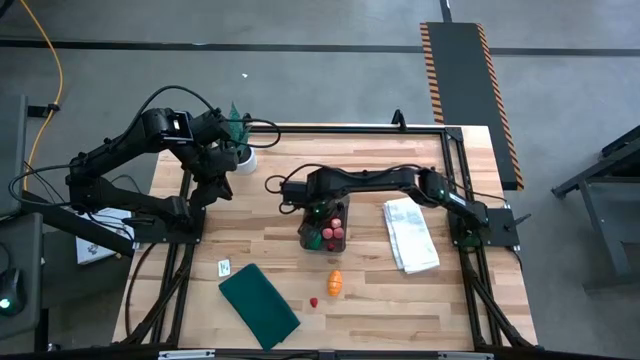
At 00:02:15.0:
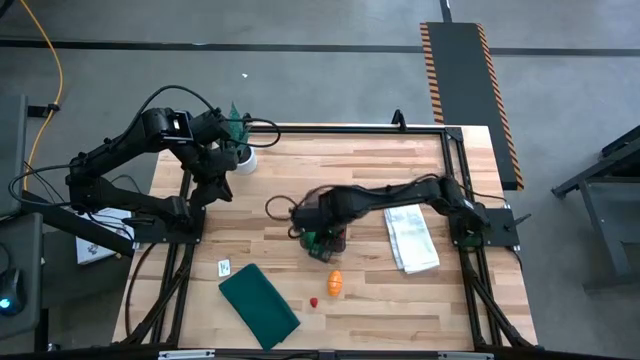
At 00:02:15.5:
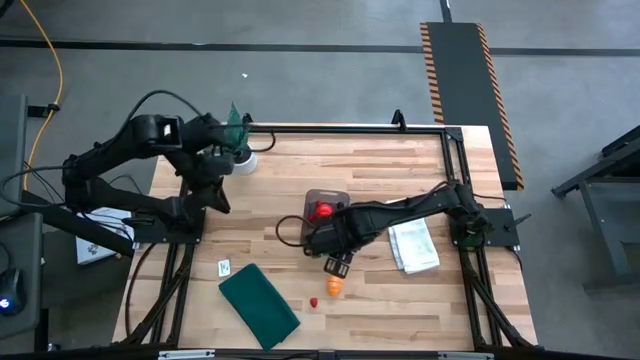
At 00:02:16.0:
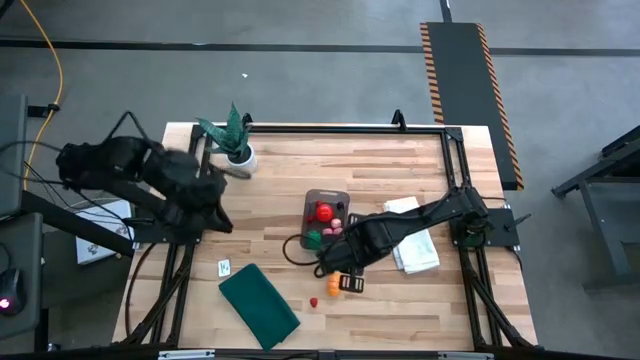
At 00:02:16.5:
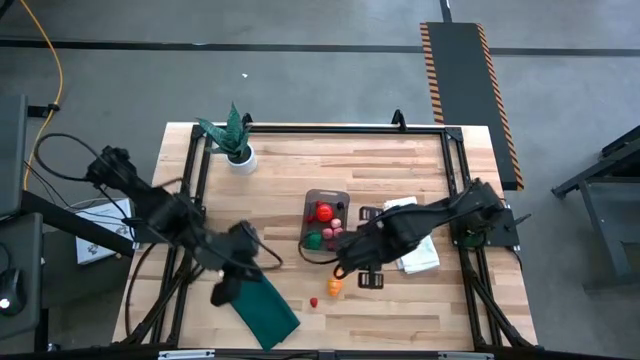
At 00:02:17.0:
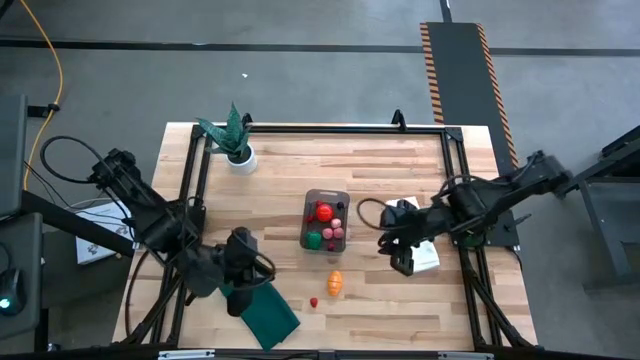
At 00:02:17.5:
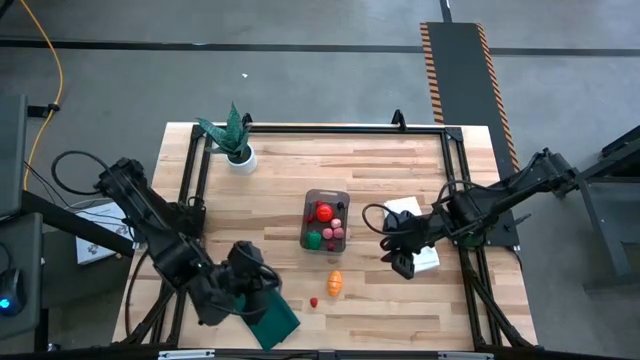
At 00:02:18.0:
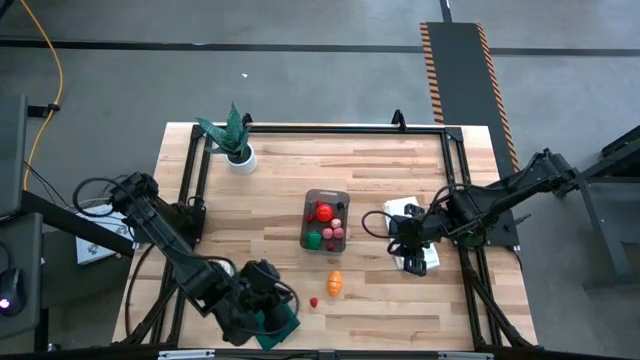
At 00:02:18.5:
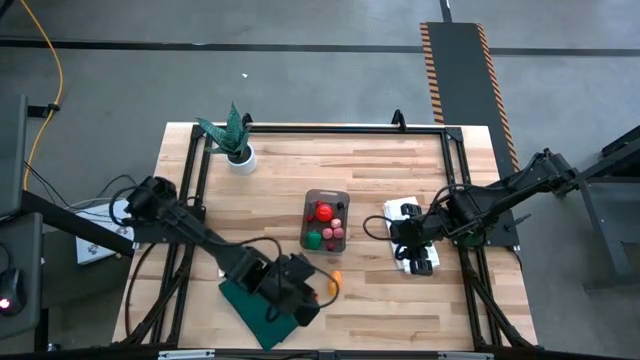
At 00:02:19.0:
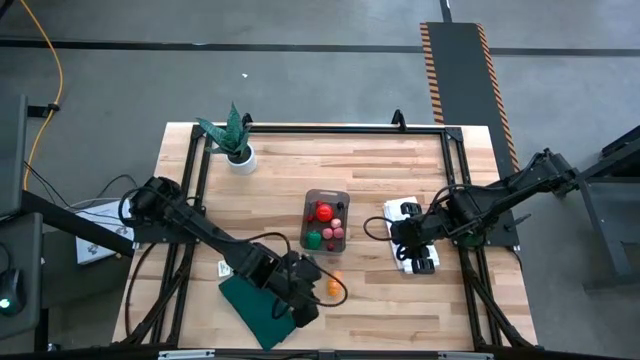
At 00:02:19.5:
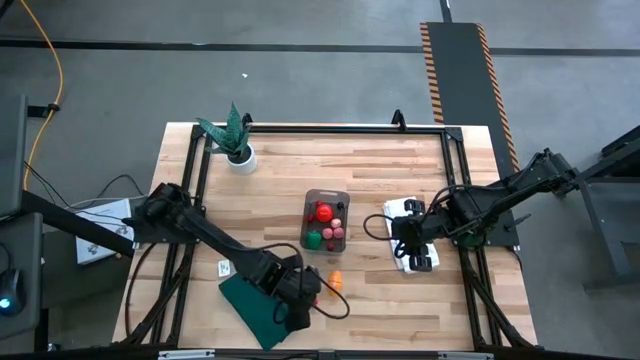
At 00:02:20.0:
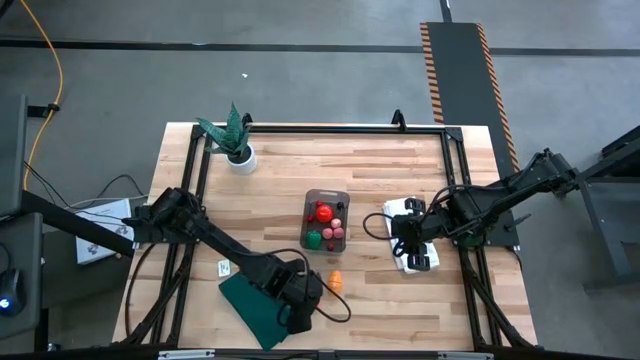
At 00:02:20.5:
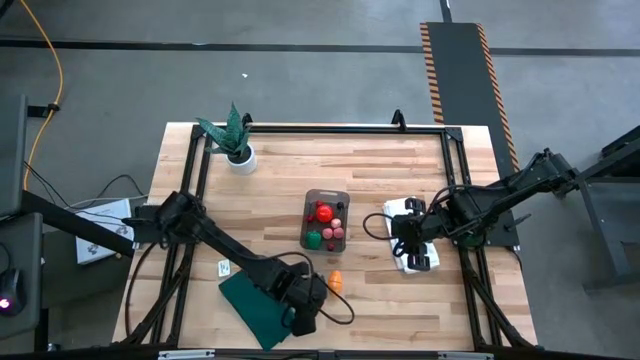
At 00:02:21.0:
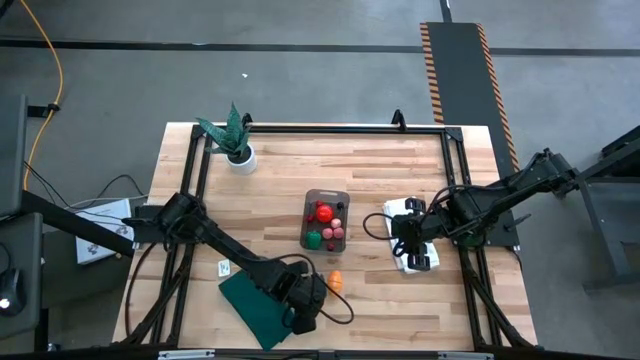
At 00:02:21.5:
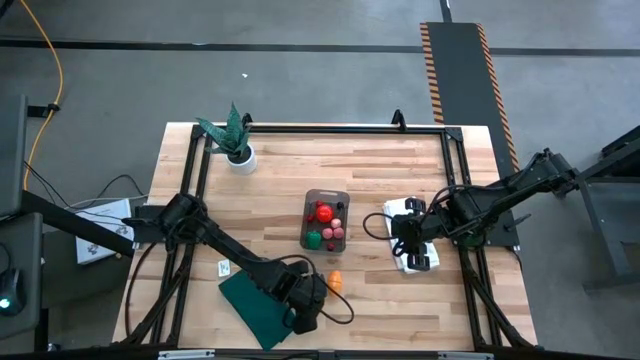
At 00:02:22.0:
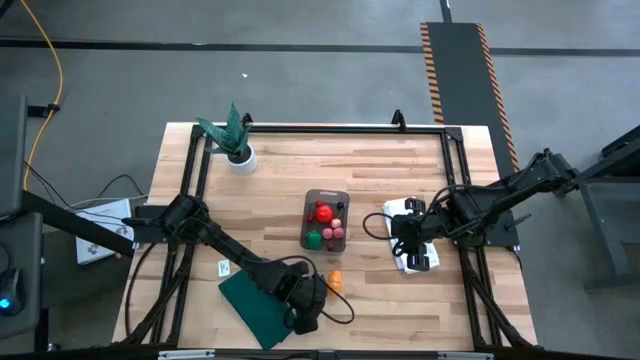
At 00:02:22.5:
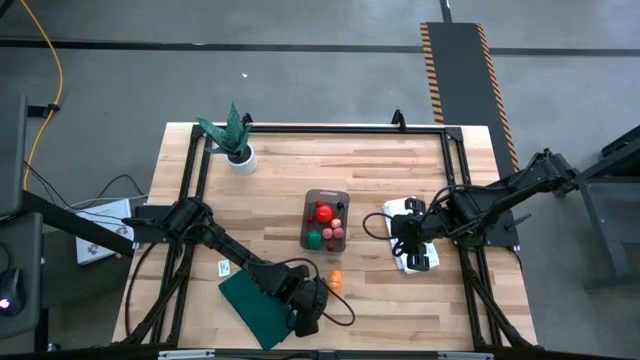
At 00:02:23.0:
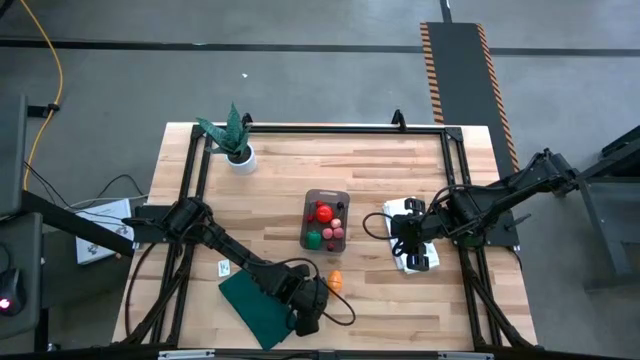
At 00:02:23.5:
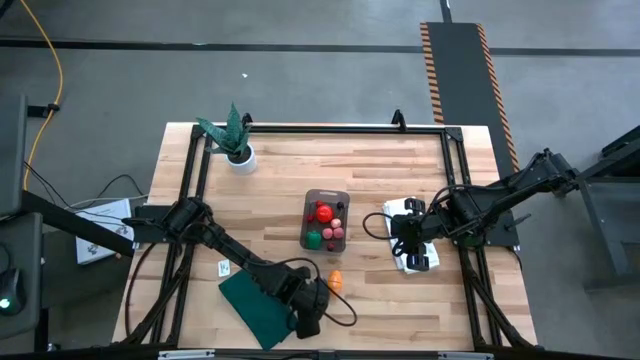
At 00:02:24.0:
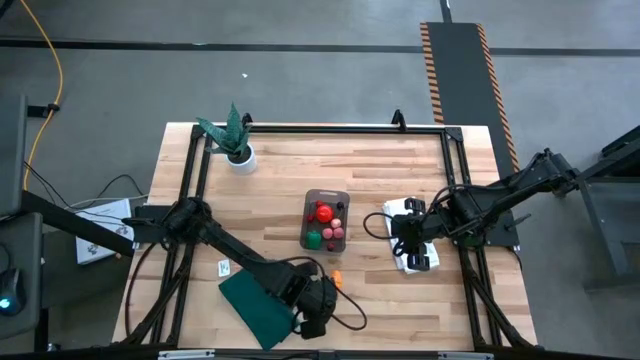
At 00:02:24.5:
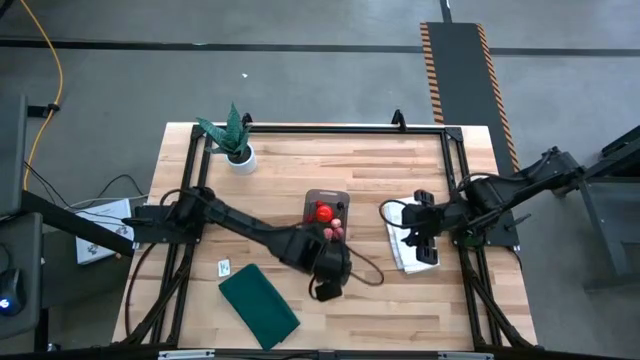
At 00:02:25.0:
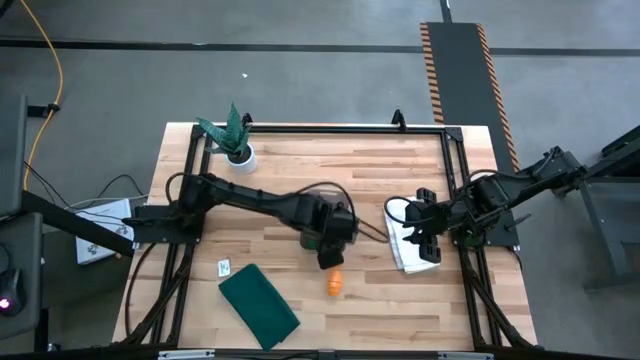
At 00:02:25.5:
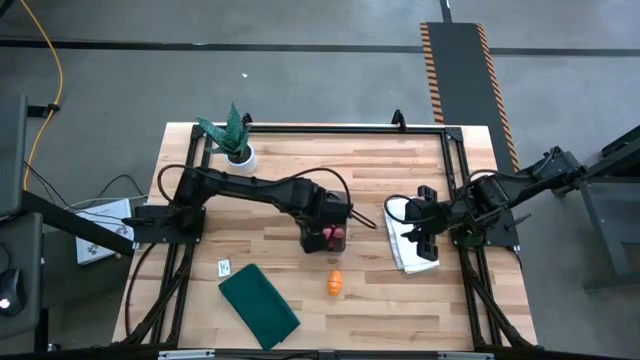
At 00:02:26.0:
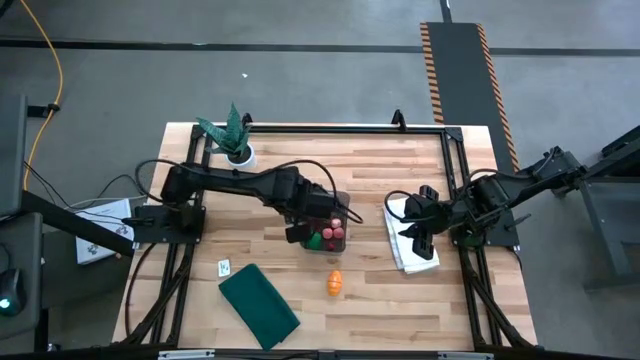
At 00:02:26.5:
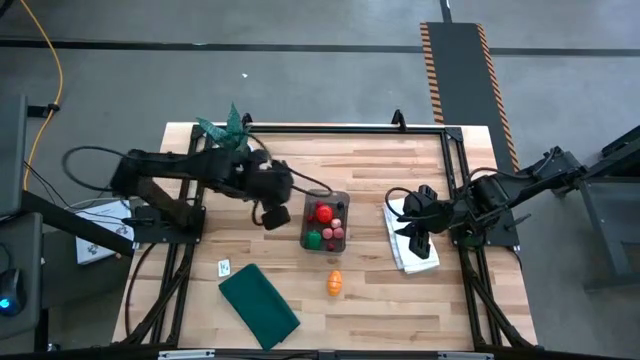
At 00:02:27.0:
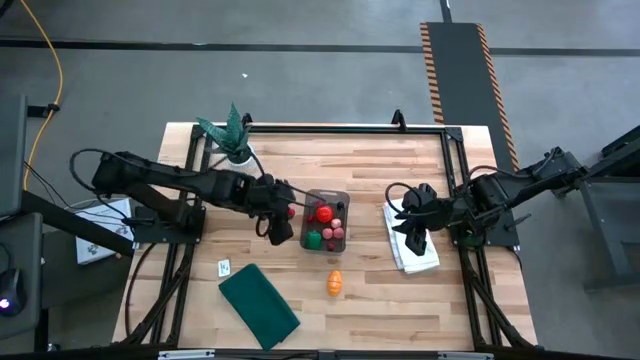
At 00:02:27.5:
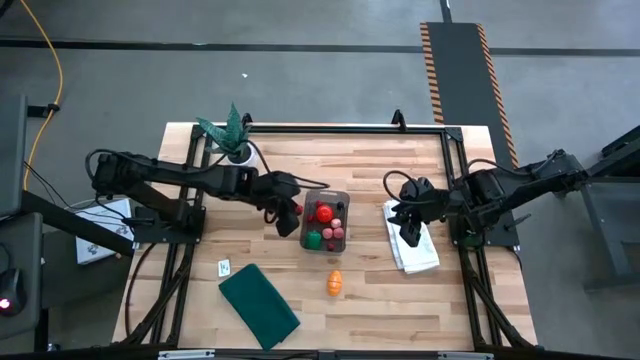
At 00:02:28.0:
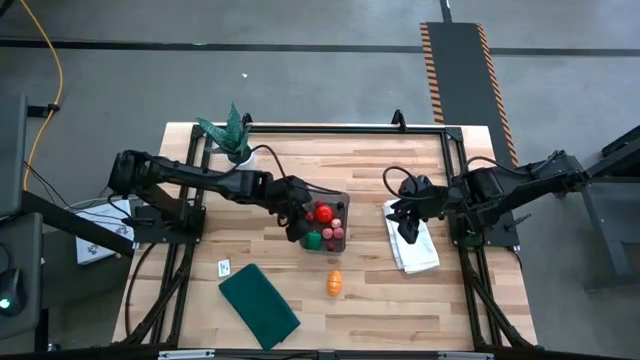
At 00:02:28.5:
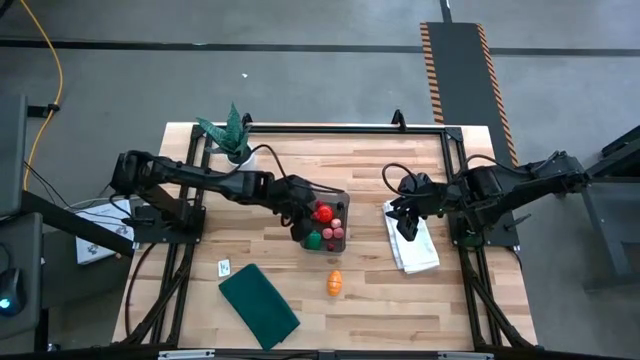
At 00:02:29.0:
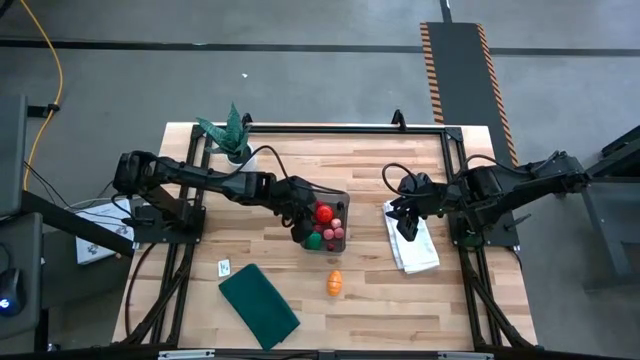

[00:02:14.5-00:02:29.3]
Task: Pick and placing Produce into tupperware
Put the red raspberry into the transparent black bin

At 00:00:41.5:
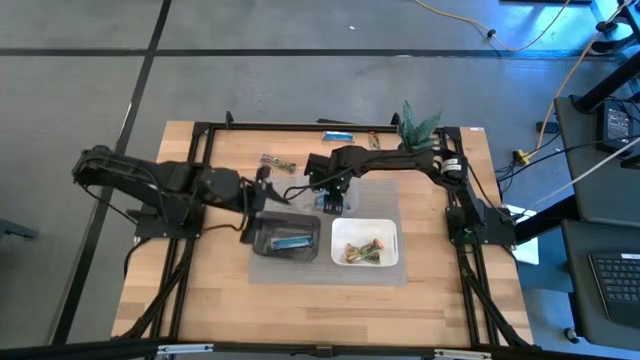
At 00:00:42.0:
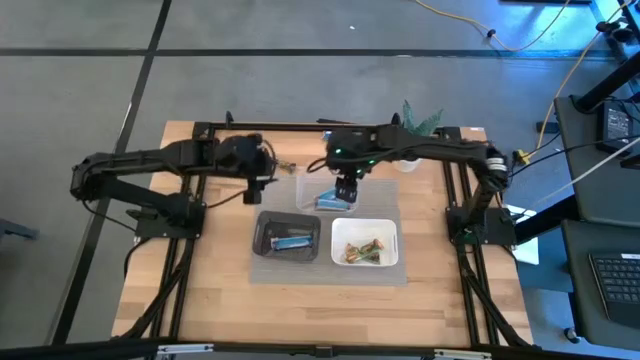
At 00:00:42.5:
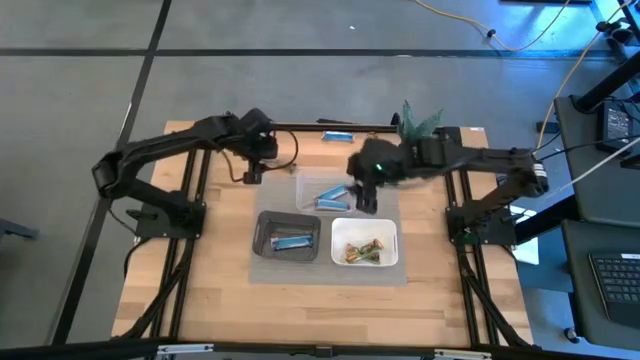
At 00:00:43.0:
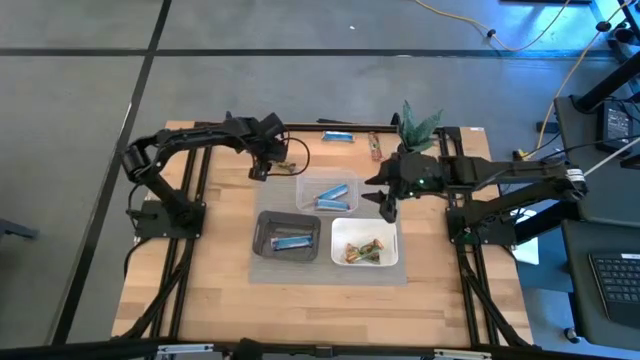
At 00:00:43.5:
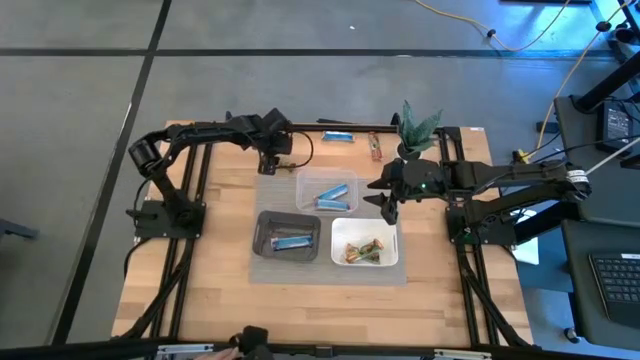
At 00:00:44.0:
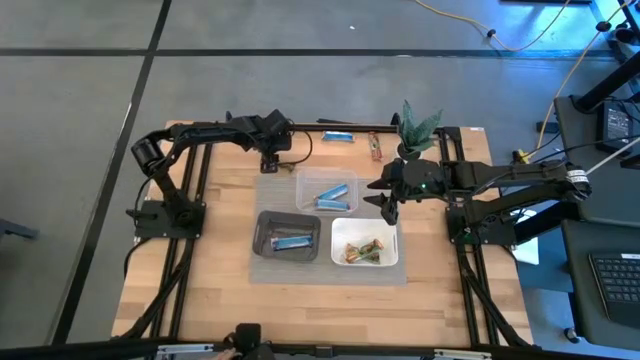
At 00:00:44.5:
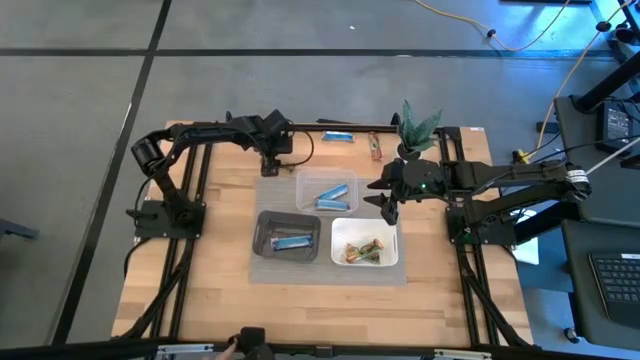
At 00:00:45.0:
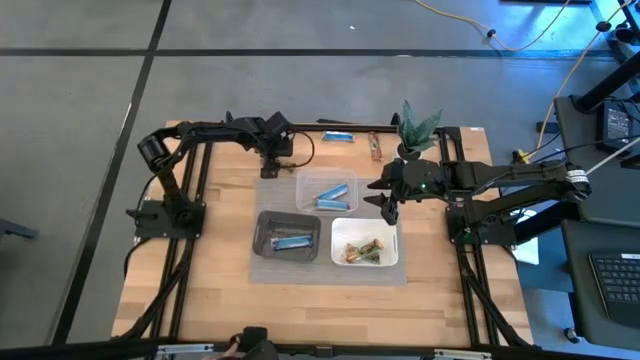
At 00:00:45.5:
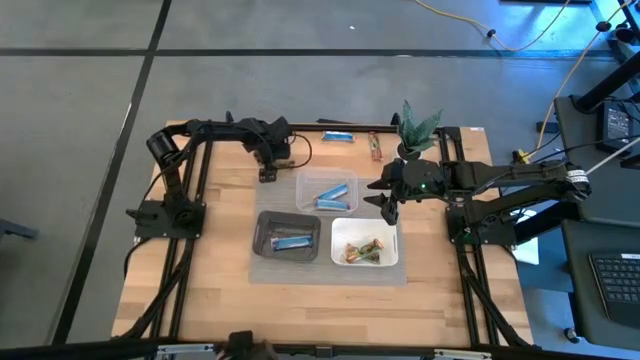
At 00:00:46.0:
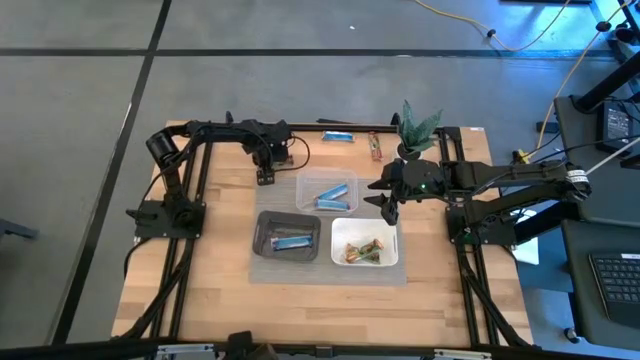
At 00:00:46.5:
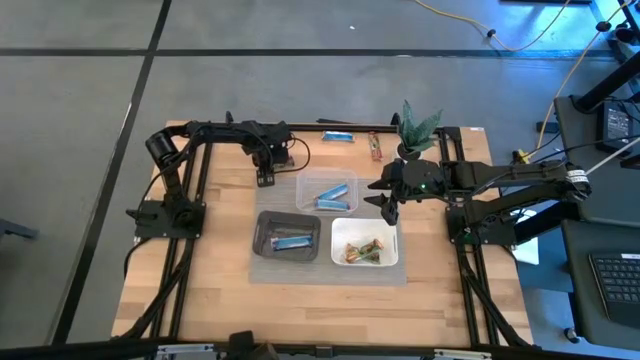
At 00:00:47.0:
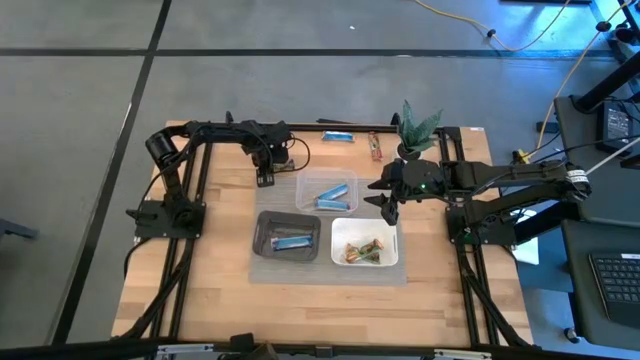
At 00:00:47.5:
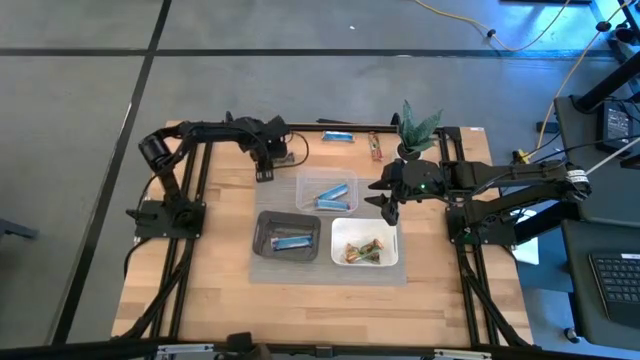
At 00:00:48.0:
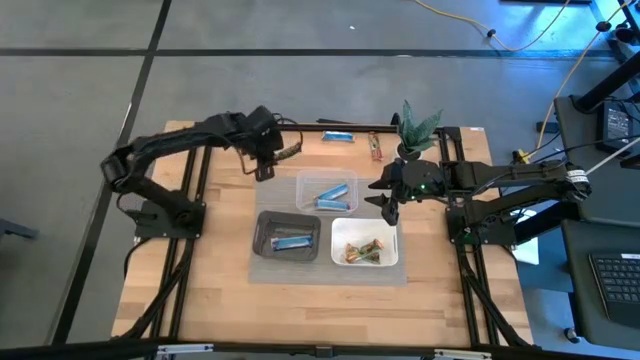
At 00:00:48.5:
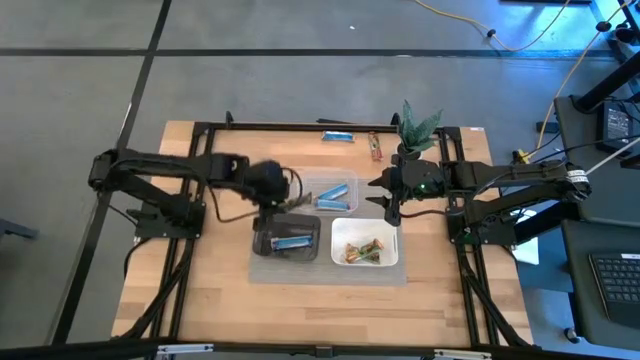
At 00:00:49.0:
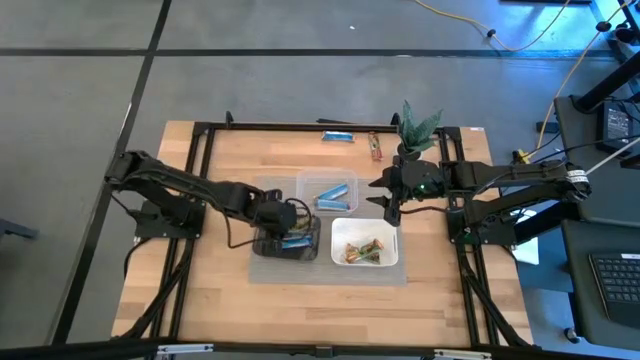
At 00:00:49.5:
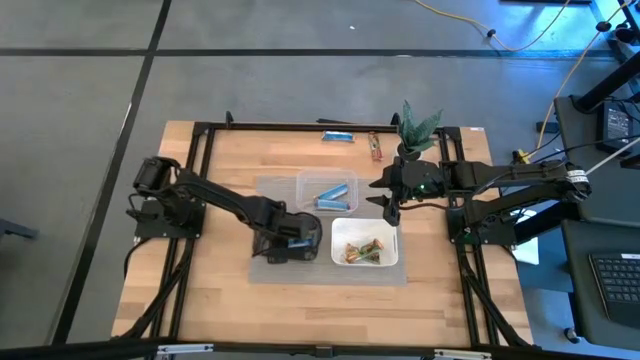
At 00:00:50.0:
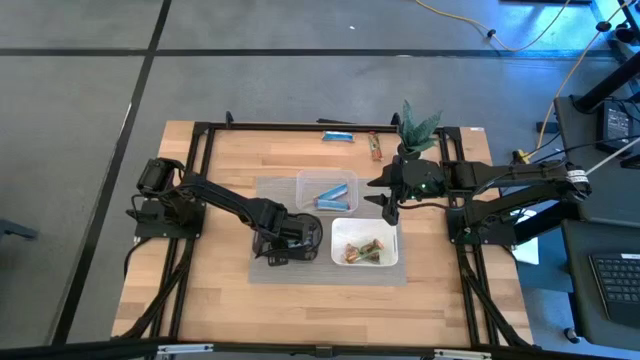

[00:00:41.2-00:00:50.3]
Task: Pick and place Granola Bars by type
Put the blue granola bar into the black bin
